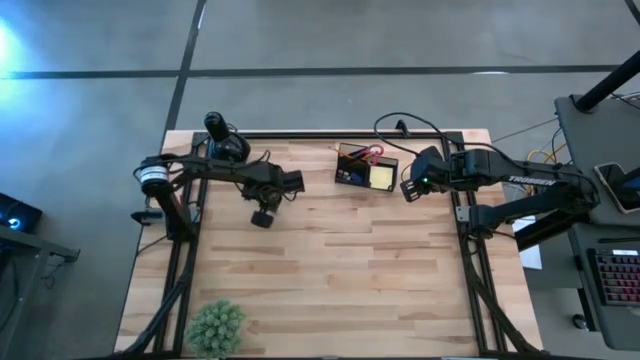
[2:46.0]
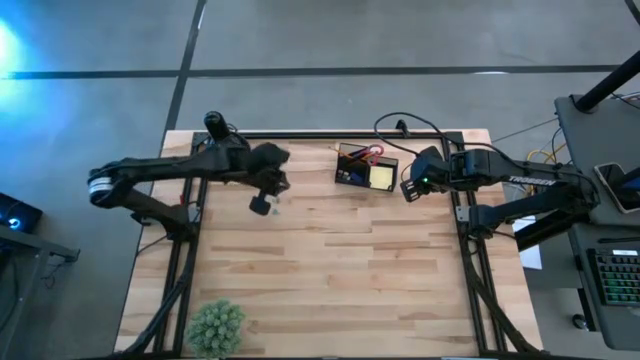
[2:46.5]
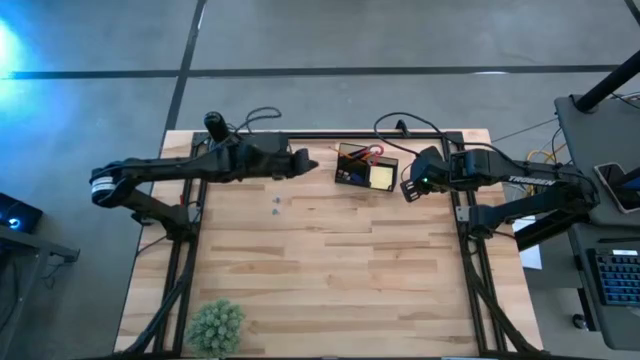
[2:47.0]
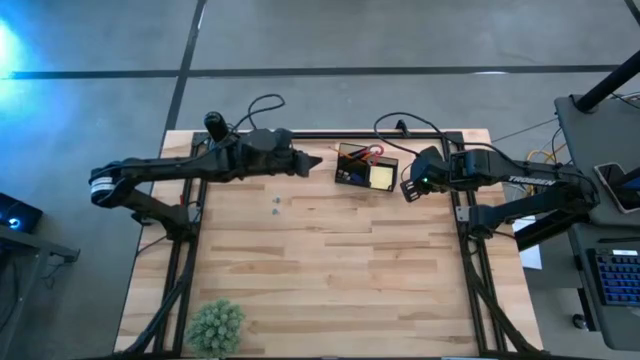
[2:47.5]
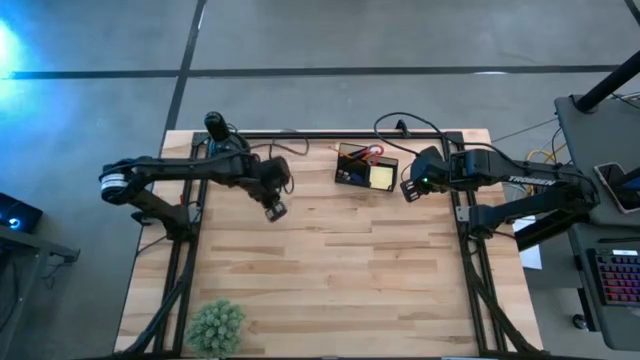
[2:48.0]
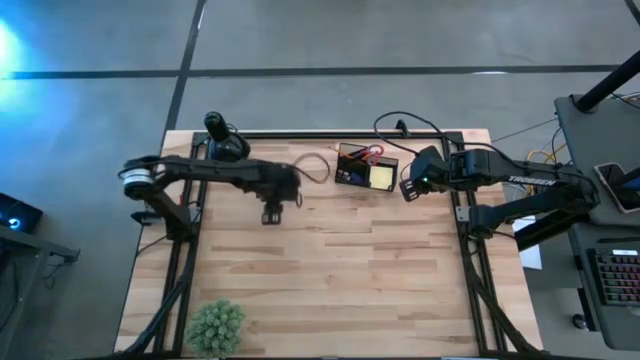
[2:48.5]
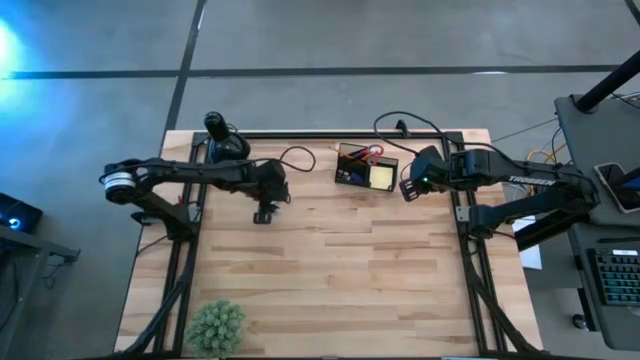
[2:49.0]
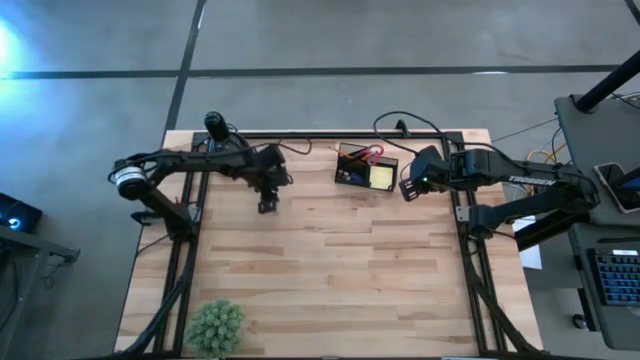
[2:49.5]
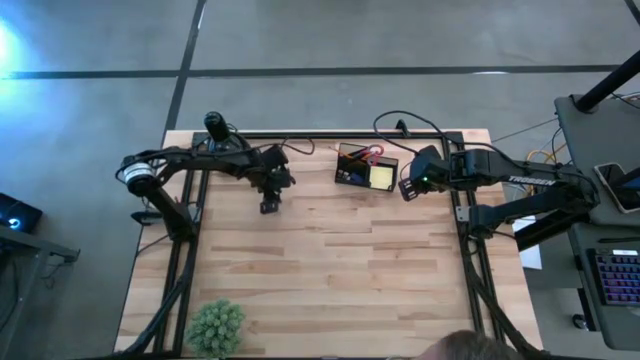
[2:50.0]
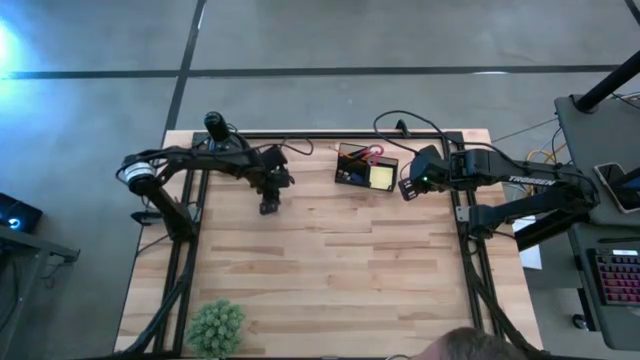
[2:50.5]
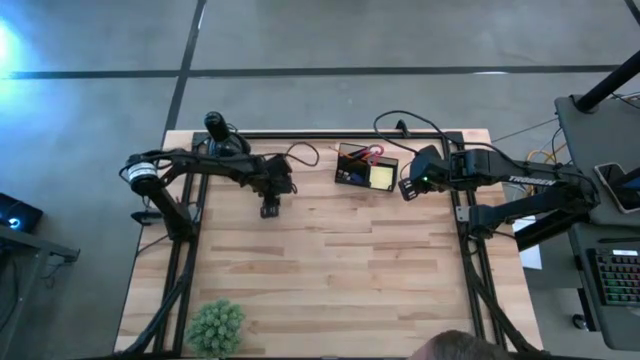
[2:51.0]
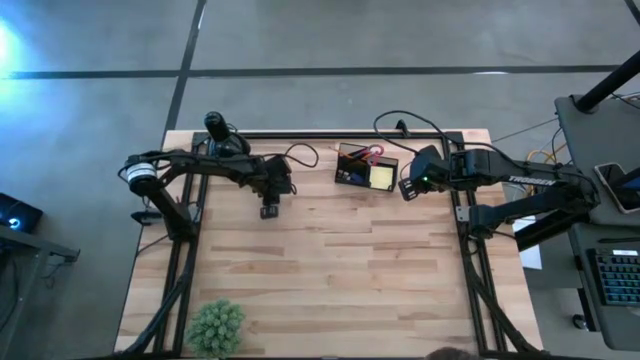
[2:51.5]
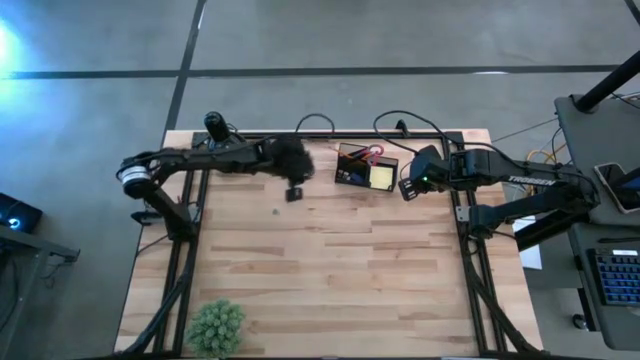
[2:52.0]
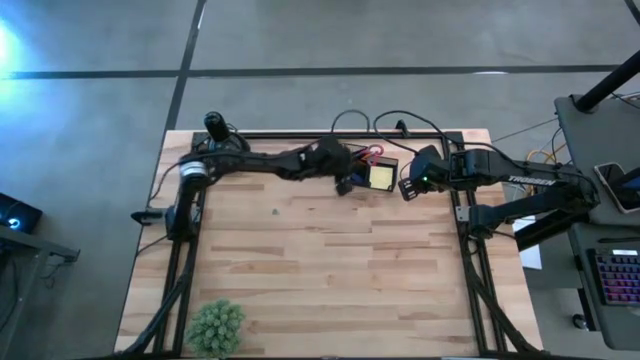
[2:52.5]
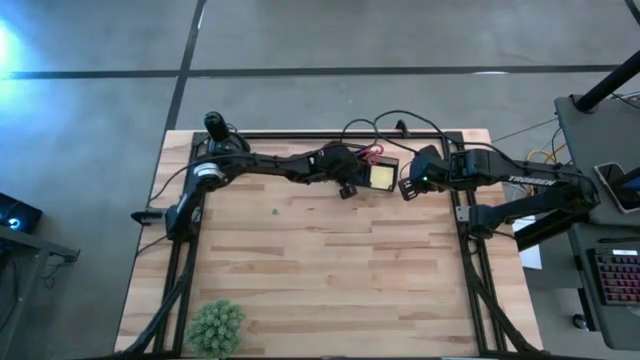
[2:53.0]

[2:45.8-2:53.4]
Task: Pick and place office supplies into organizer
Put the top blue binder clip into the desk organizer

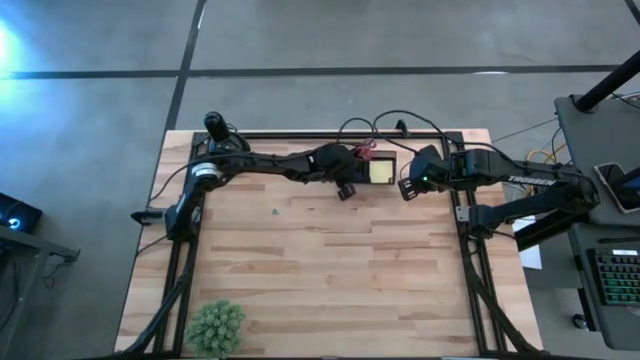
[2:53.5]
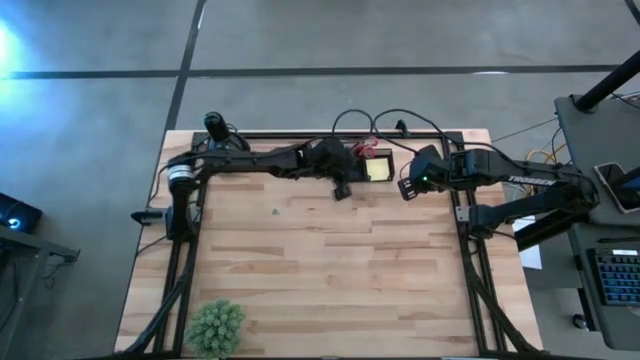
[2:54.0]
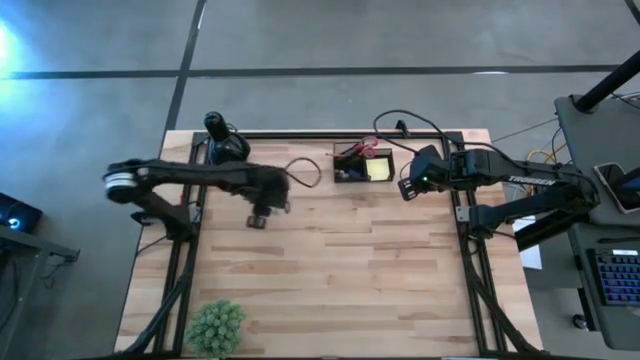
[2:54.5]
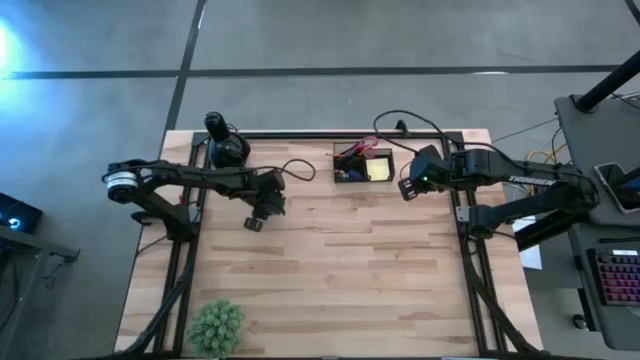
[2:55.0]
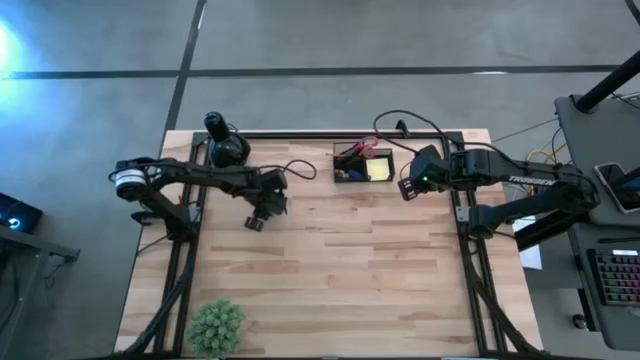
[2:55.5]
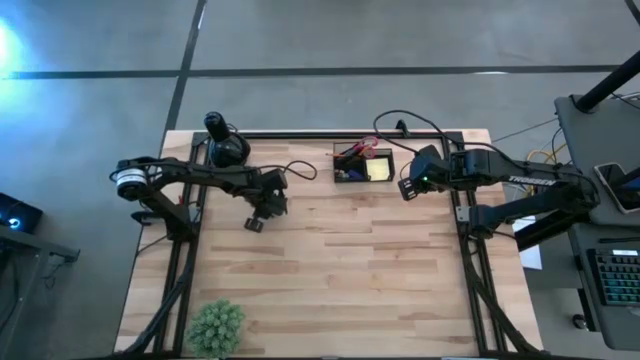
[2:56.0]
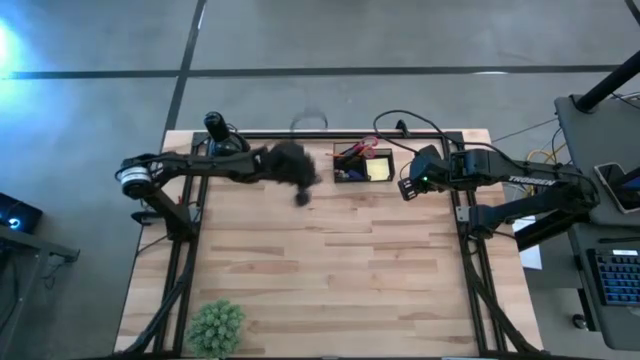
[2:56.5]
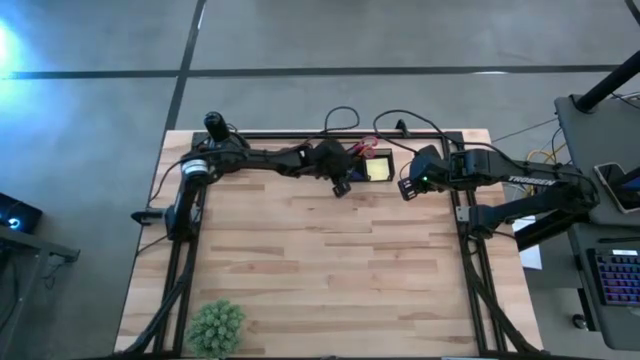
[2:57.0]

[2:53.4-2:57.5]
Put the blue binder clip into the desk organizer

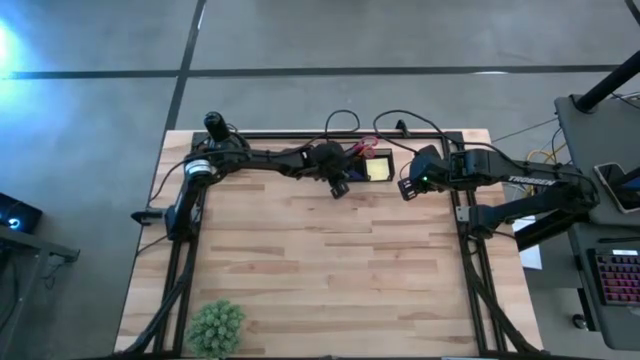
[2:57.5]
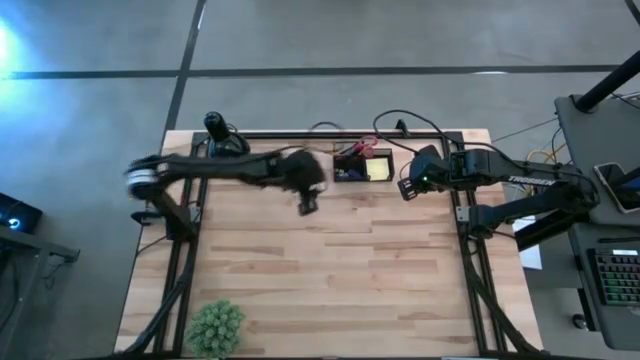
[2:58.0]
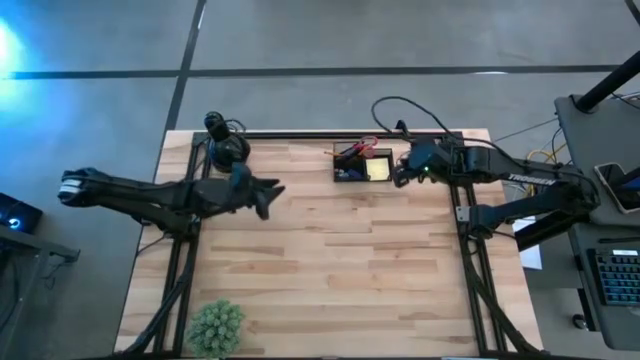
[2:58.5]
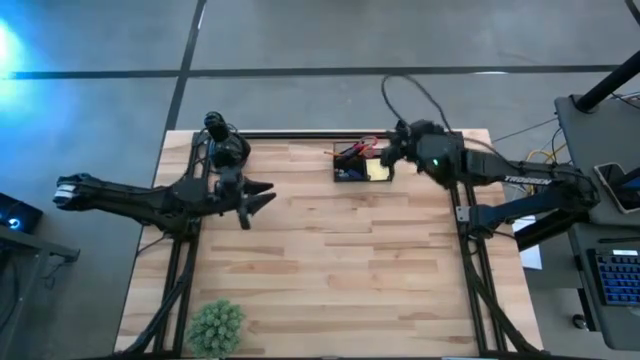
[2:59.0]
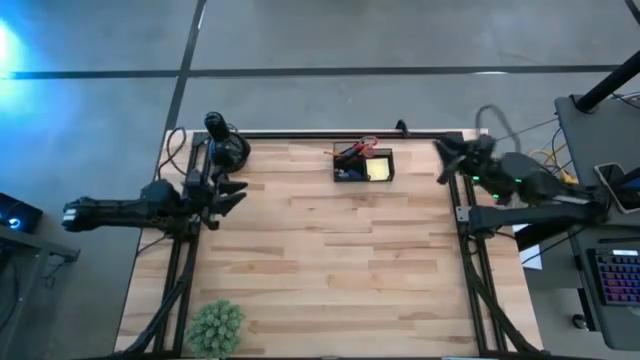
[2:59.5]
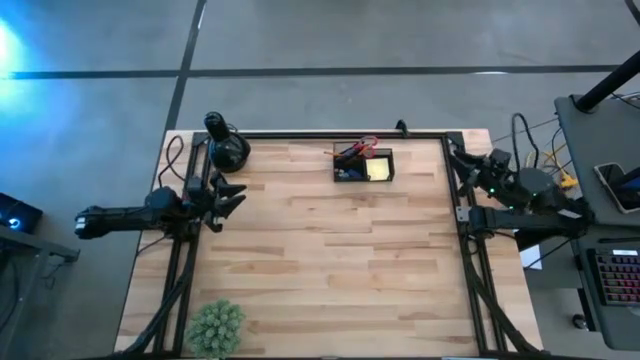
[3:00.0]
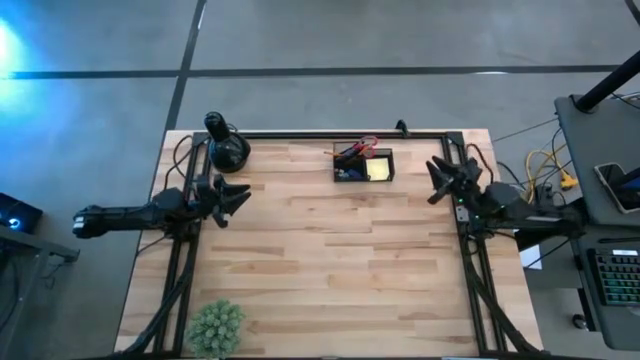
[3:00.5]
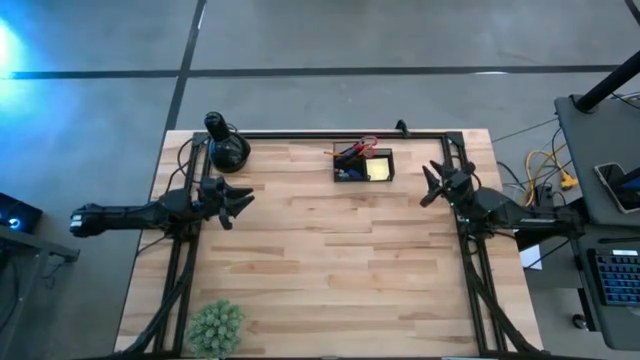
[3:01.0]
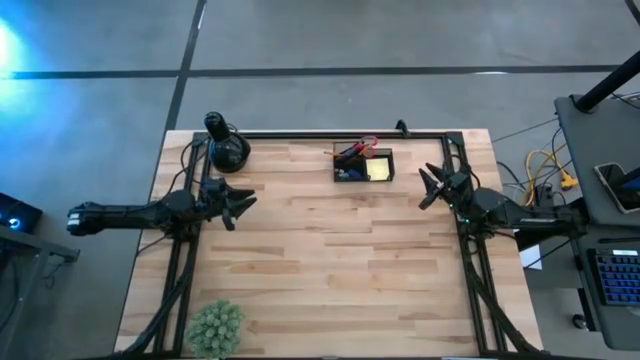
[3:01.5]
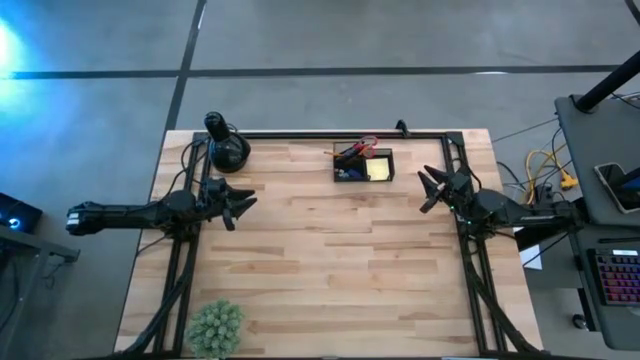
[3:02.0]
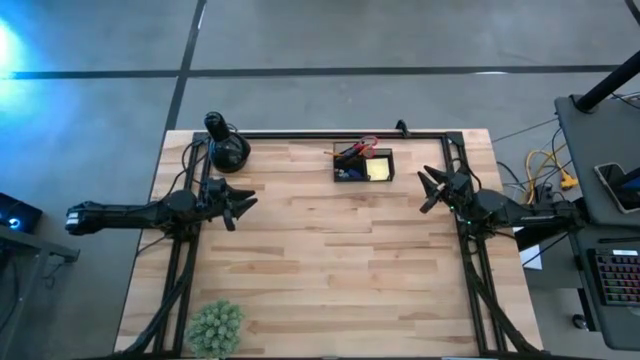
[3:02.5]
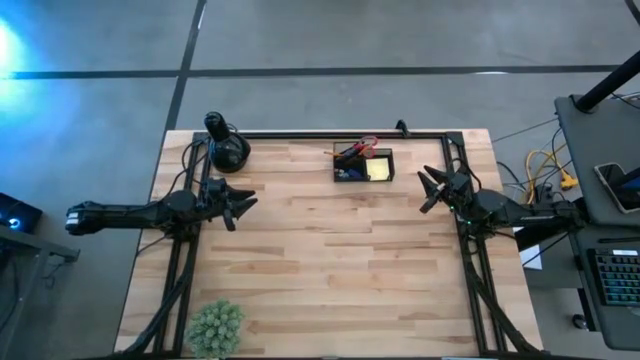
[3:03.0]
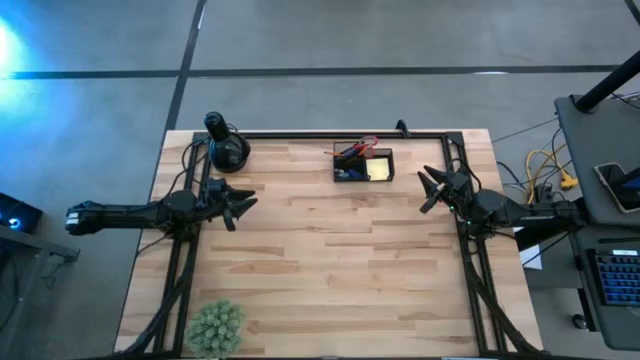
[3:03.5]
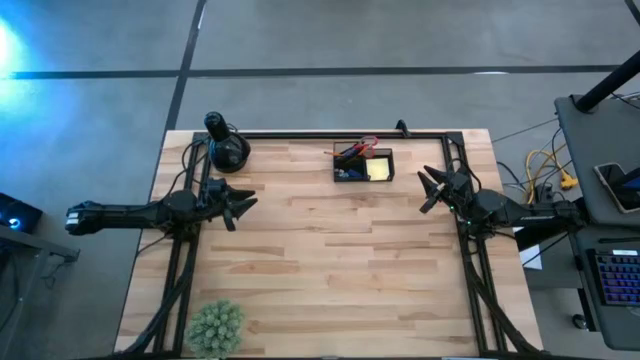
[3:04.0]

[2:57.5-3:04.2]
Return to Home Position

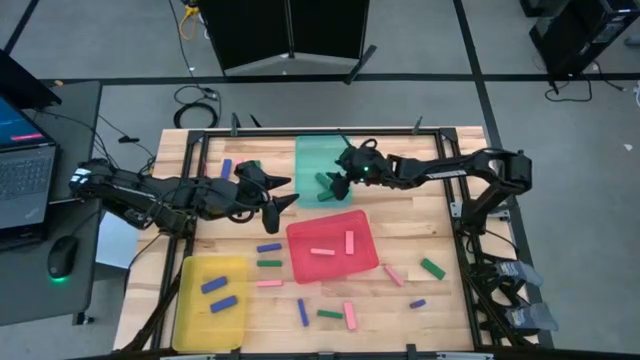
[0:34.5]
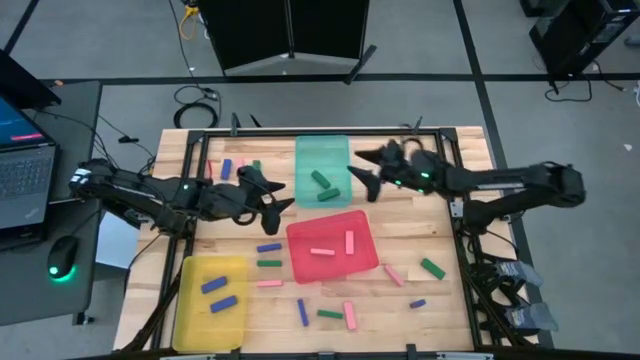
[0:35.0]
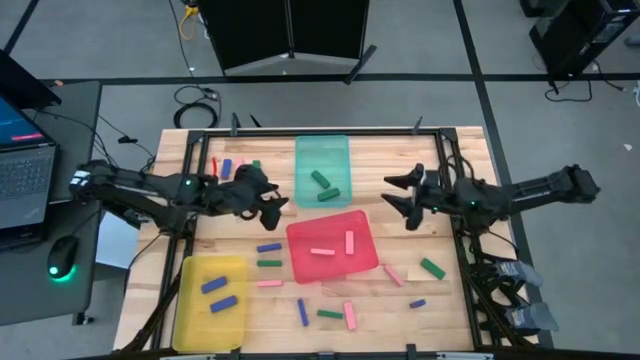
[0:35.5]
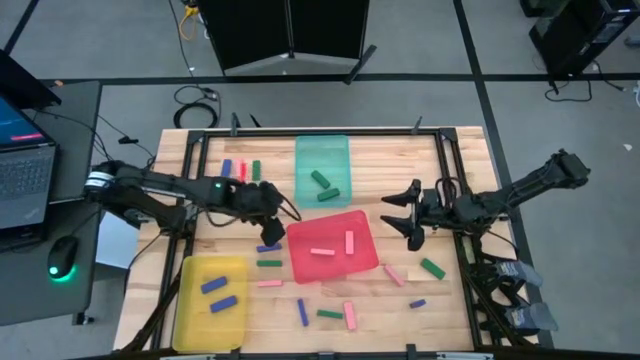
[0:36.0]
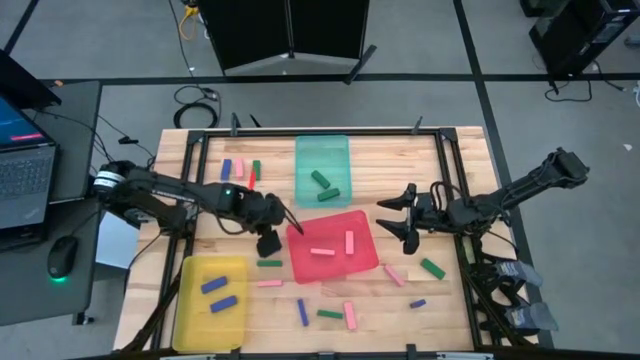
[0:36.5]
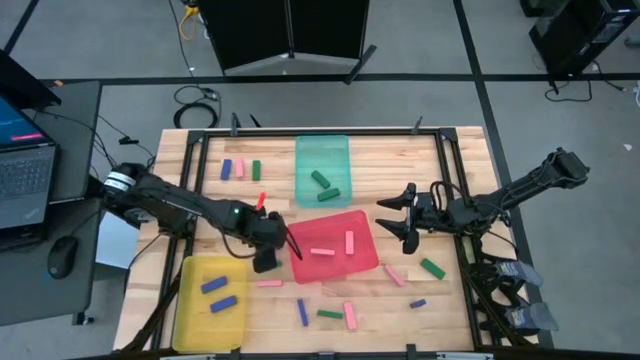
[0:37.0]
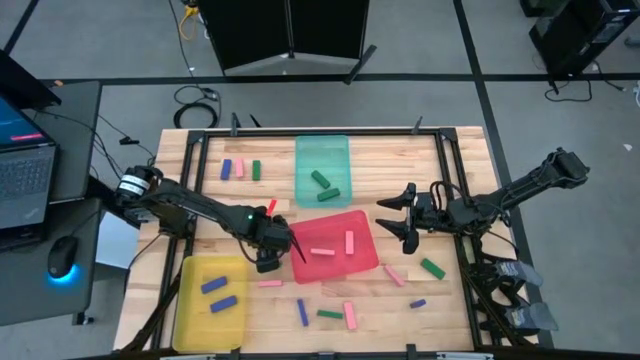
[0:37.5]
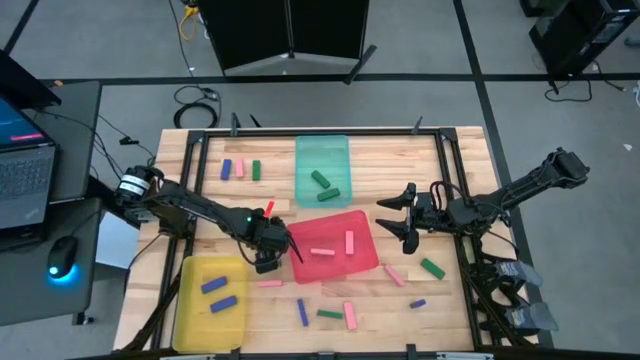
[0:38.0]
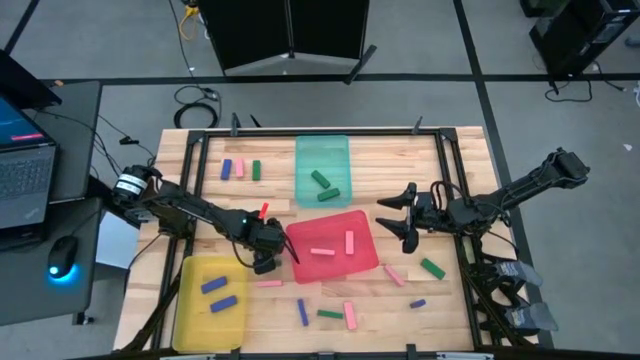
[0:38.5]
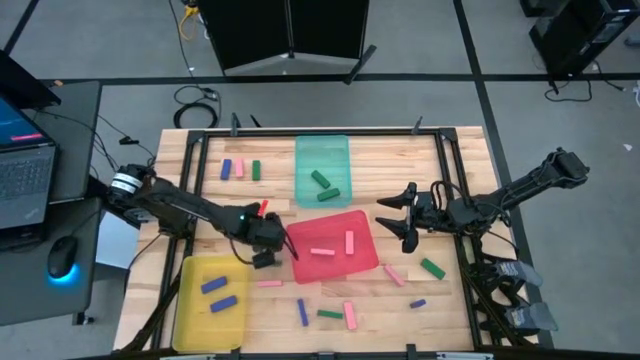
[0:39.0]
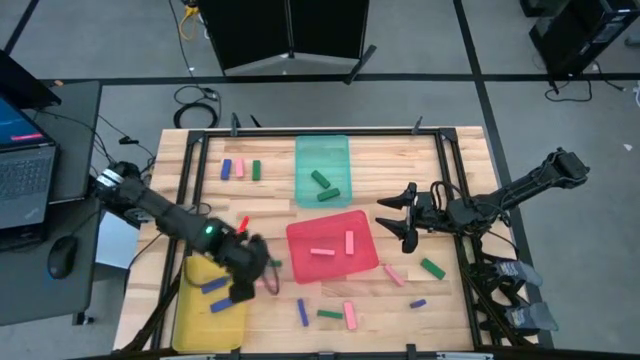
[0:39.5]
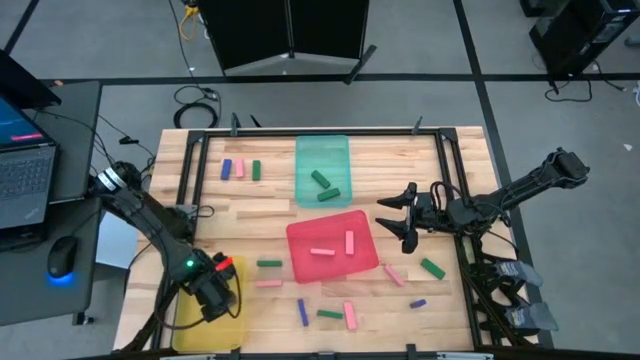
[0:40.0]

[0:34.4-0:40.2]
Task: Sort blocks
Put the blue block into the yellow bin
